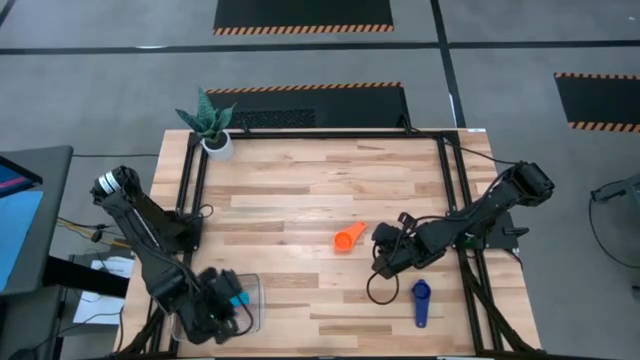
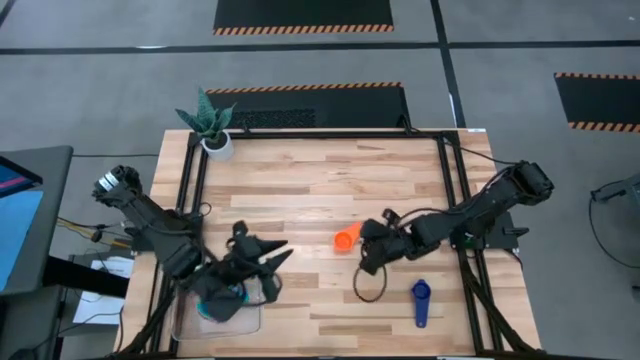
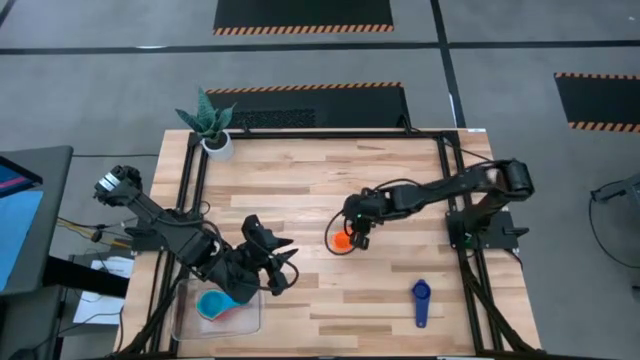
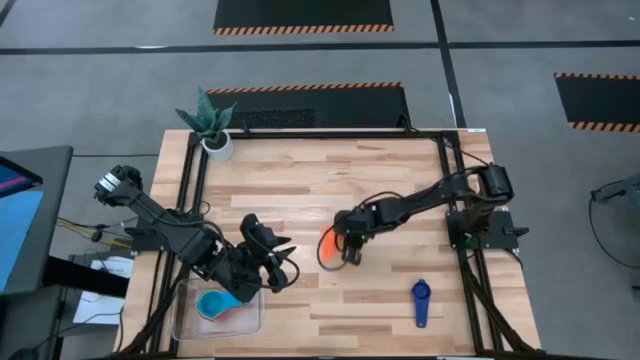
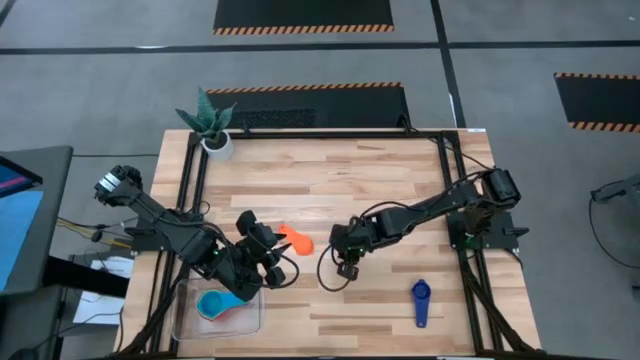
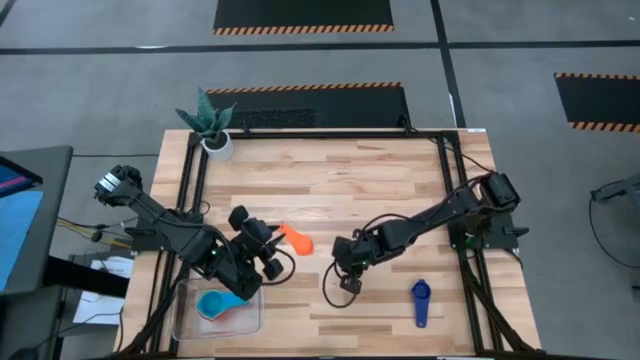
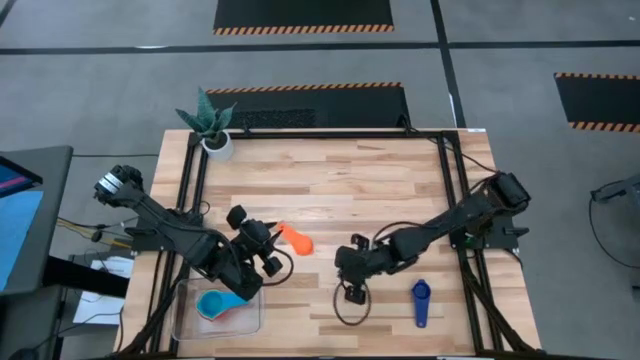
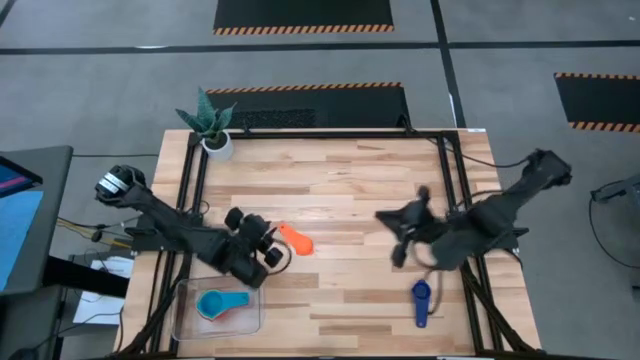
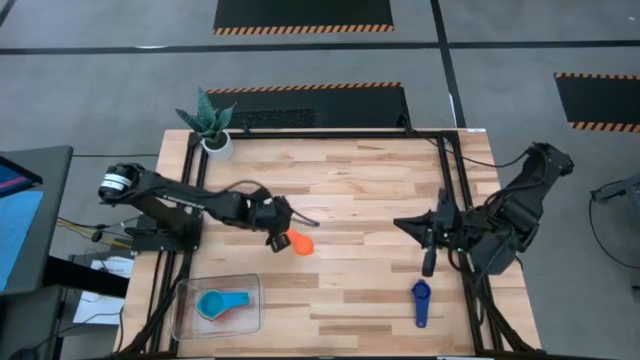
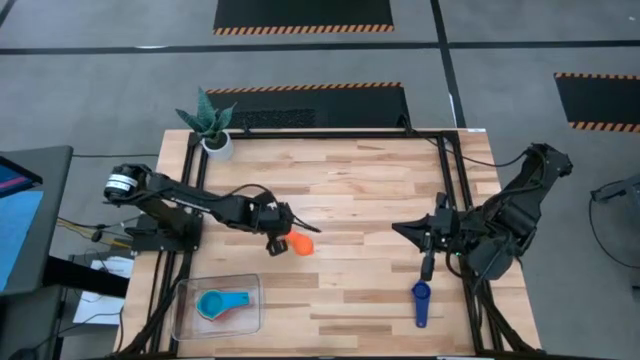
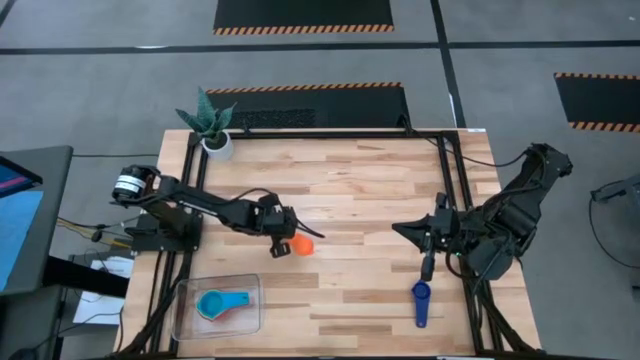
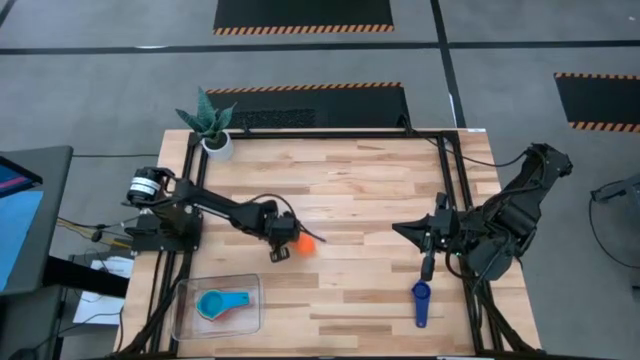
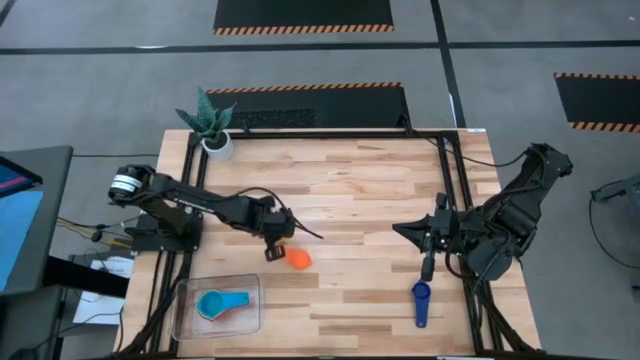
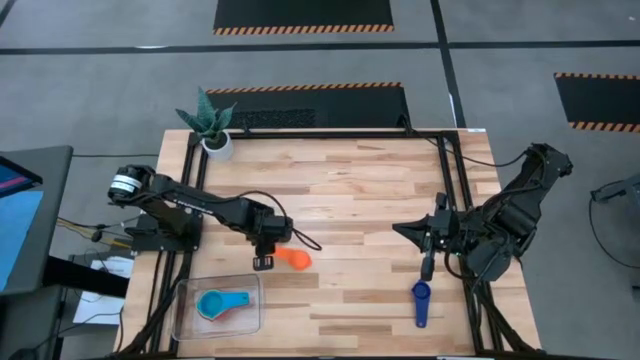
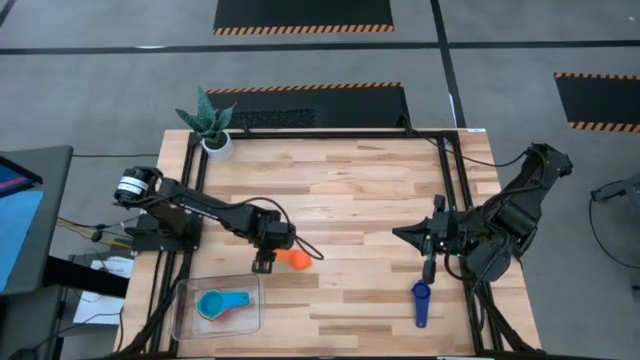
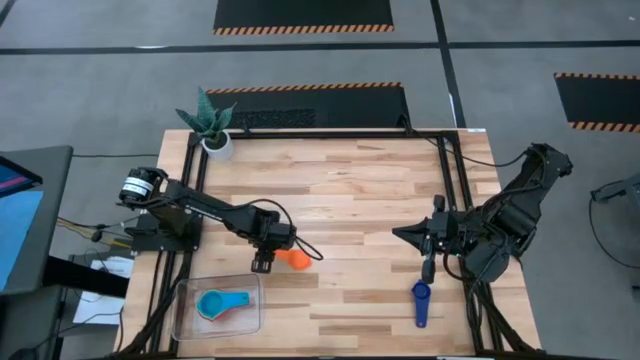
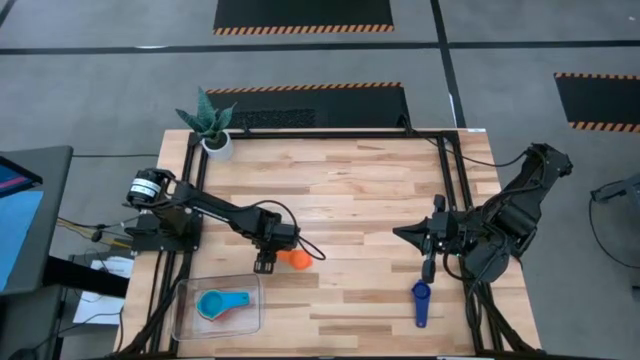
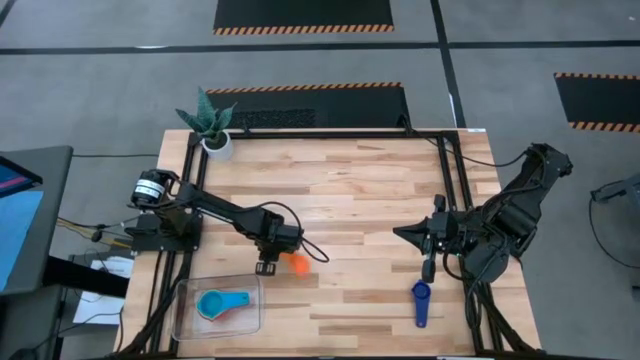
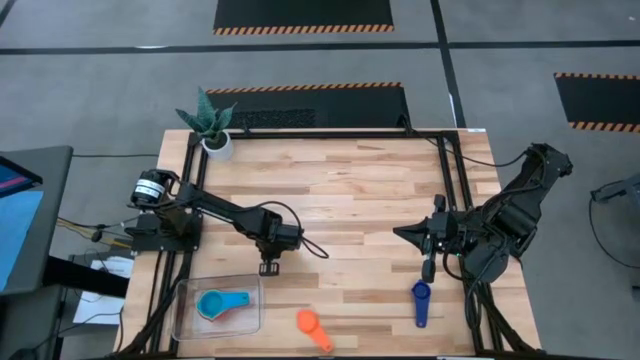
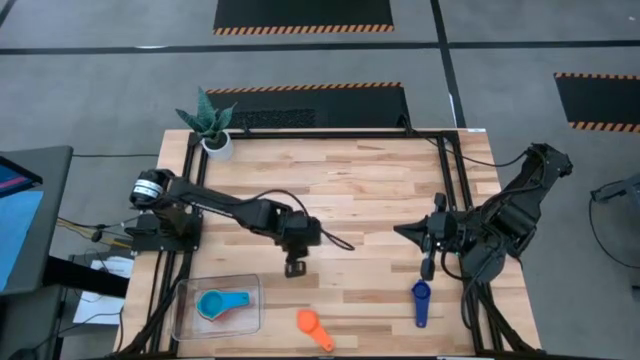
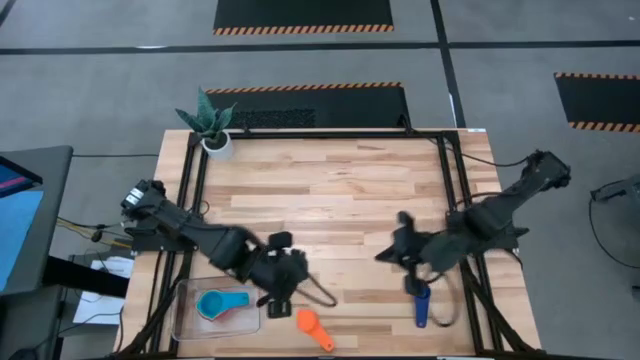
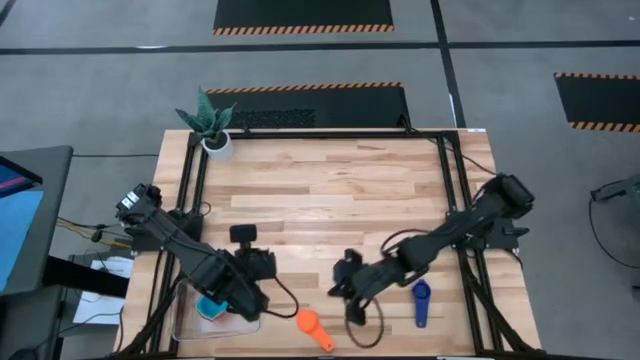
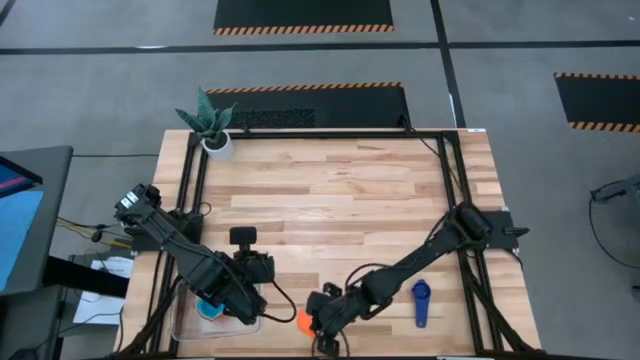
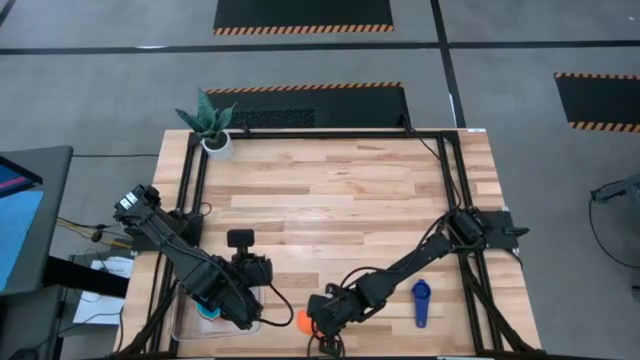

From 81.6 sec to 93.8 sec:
Task: Nest measuring cups in basket
Stack the orange measuring cup on top of the light blue measuring cup in the transparent bin

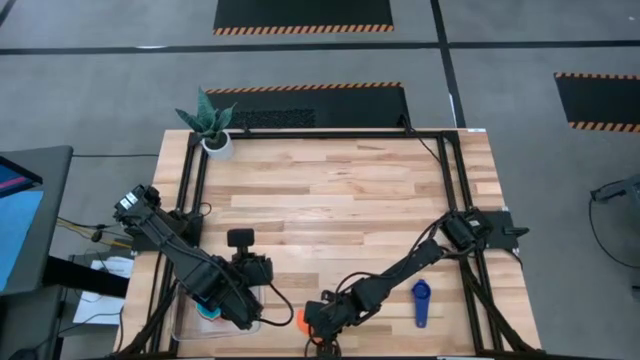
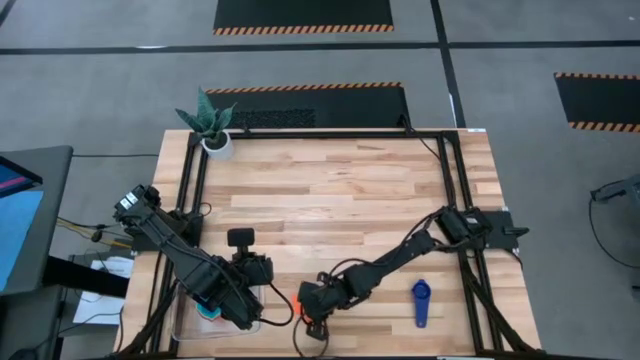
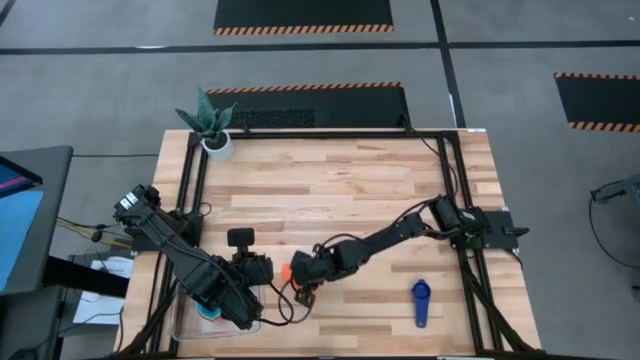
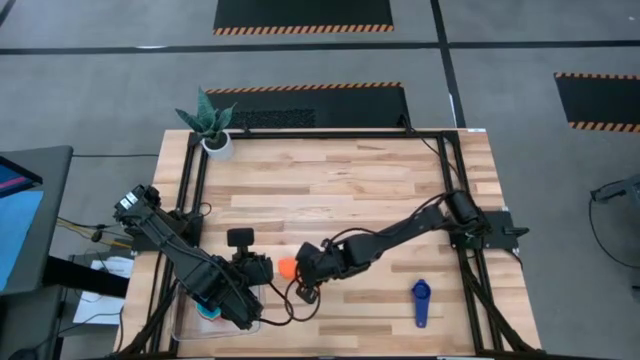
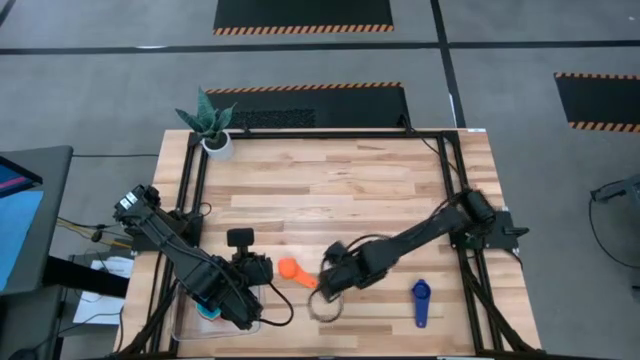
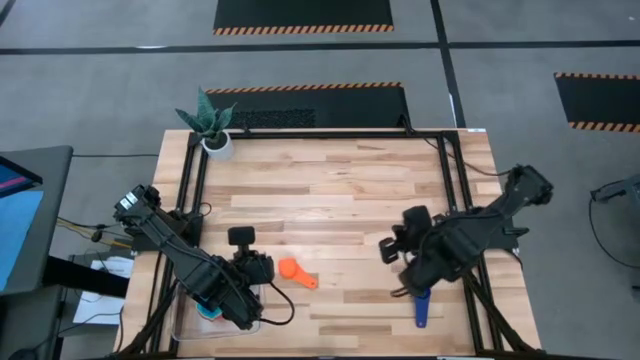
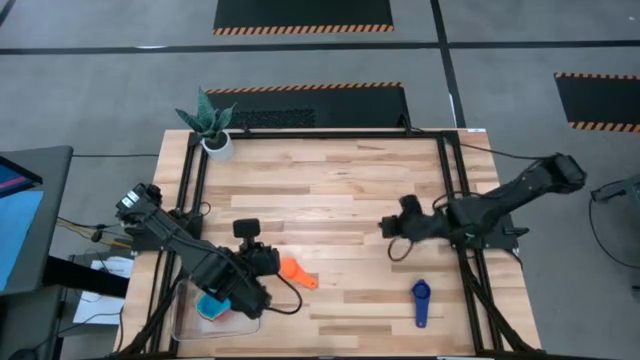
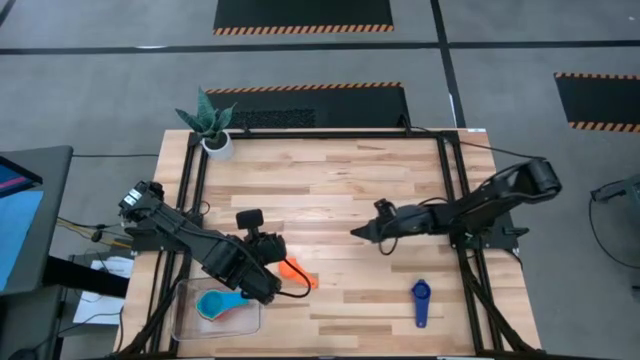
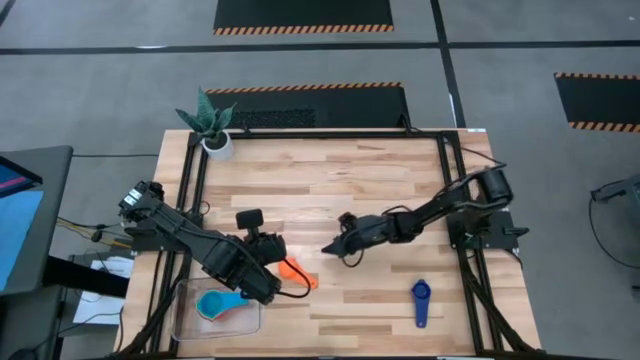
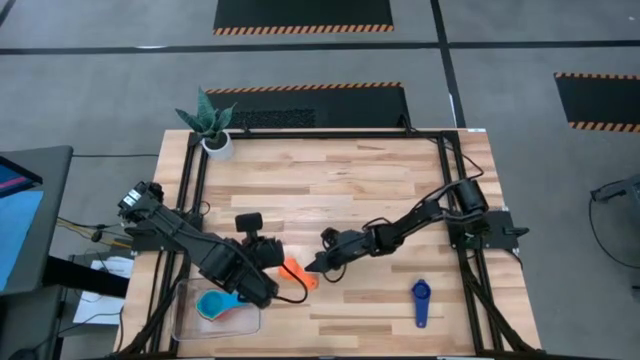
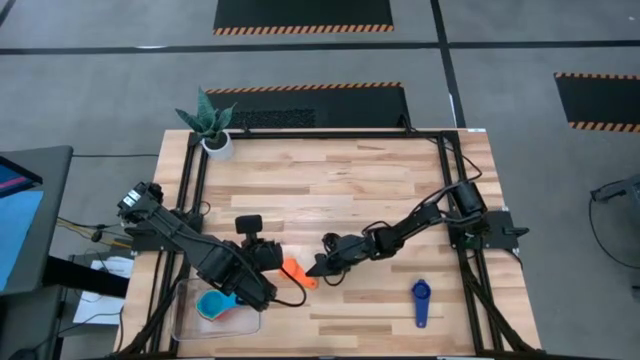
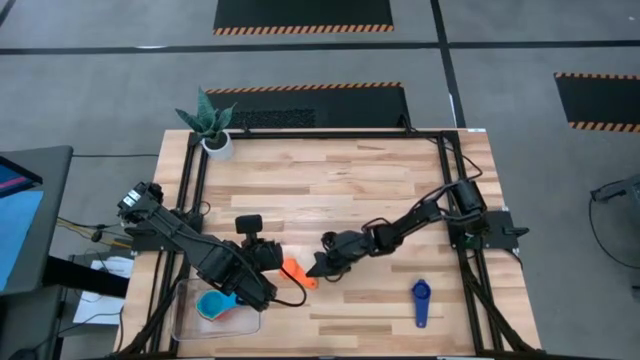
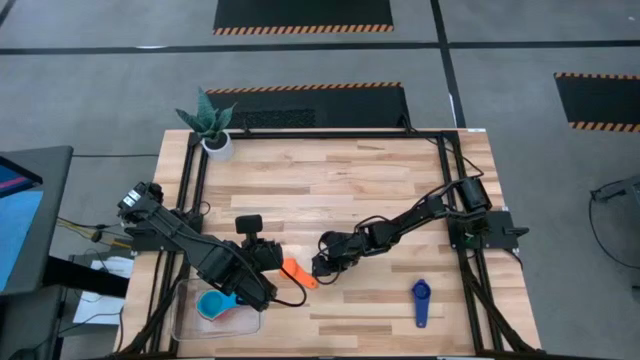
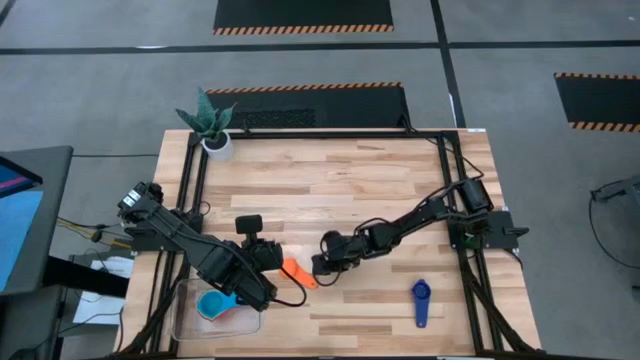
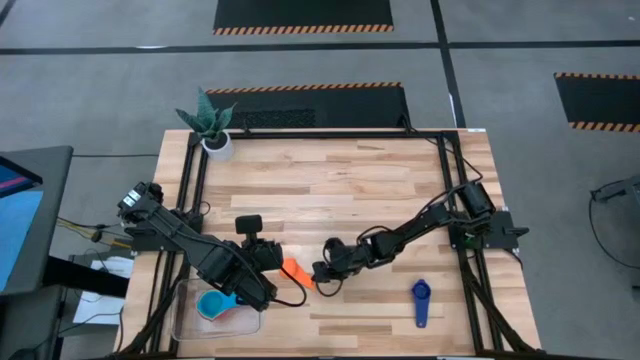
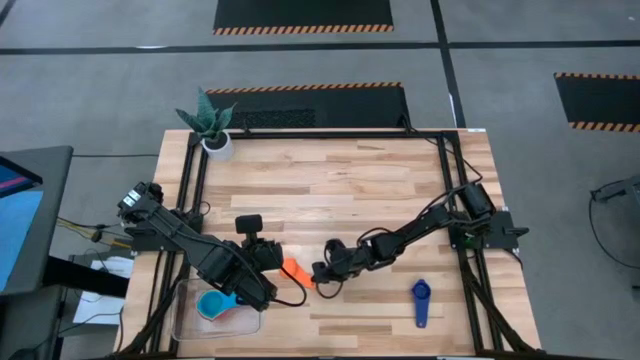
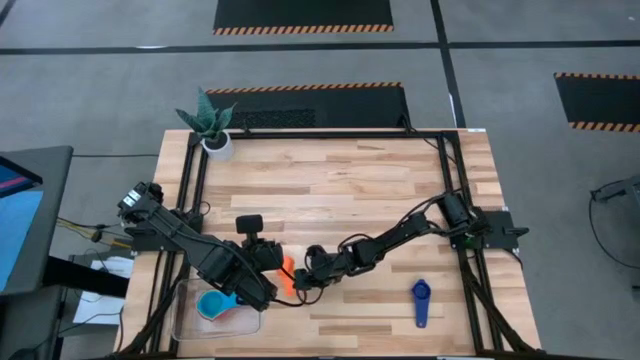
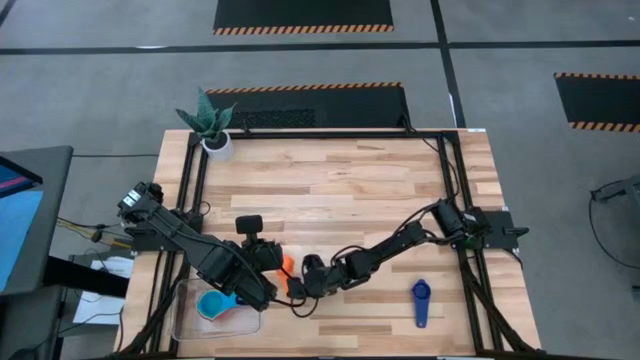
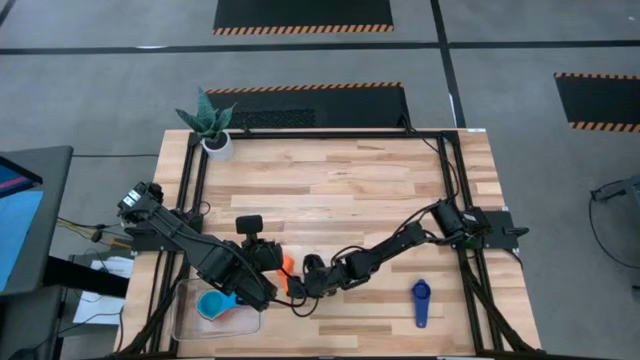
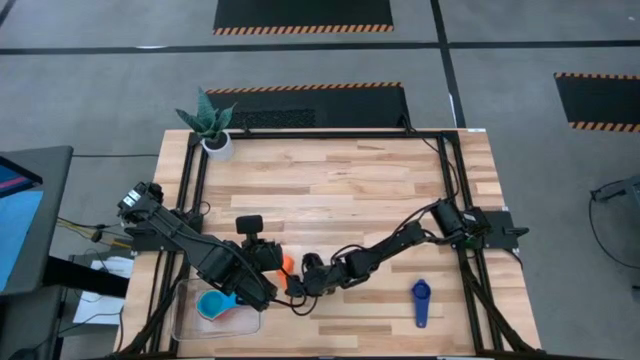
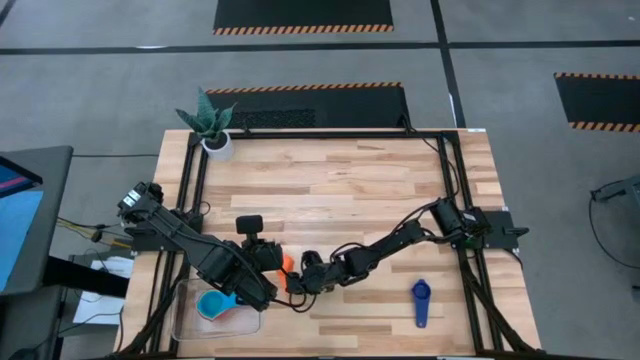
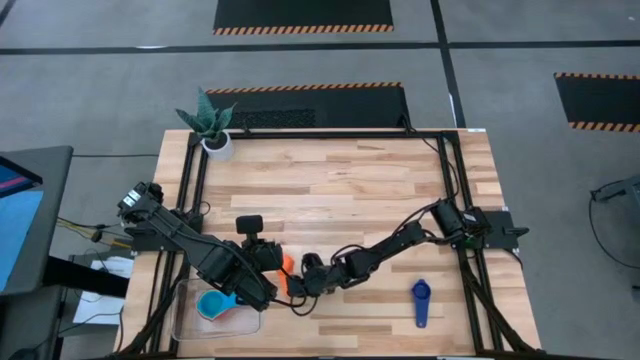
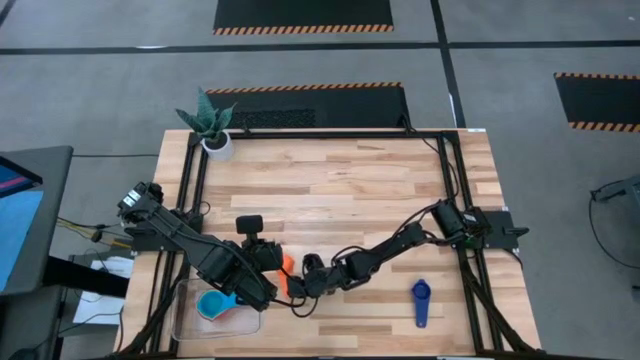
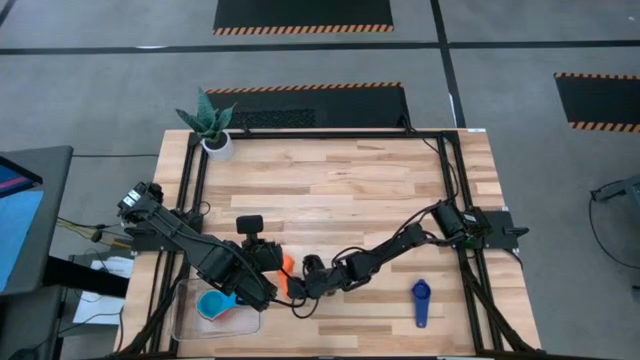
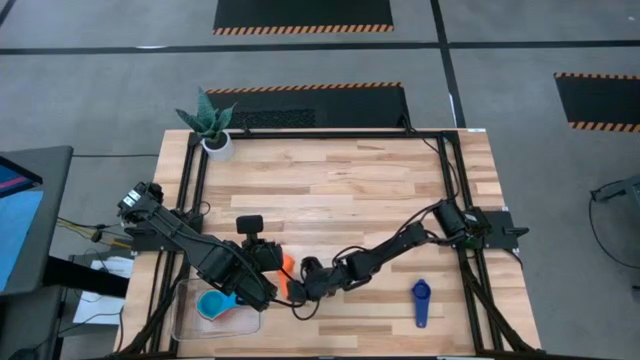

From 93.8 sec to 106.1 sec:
Stack the orange measuring cup on top of the light blue measuring cup in the transparent bin
